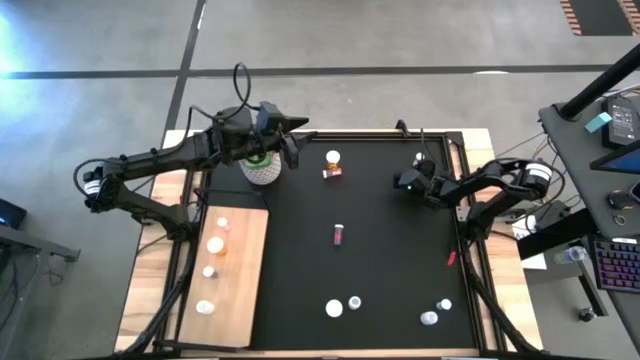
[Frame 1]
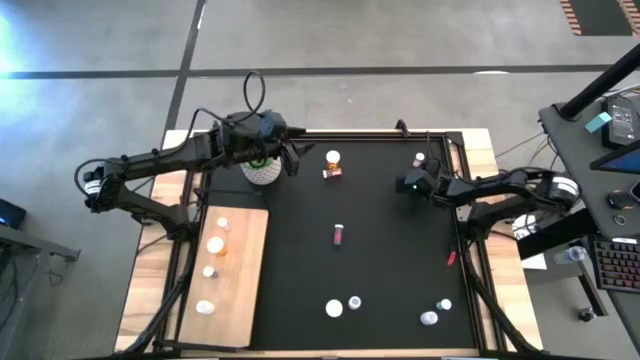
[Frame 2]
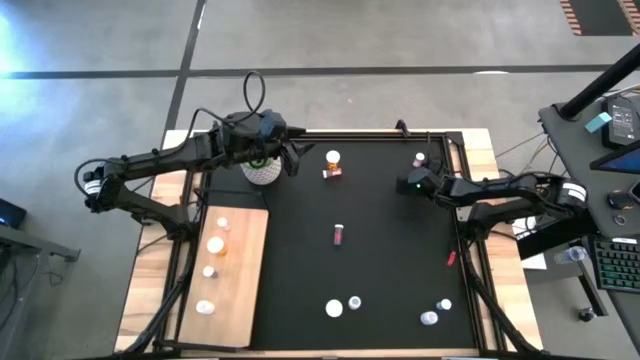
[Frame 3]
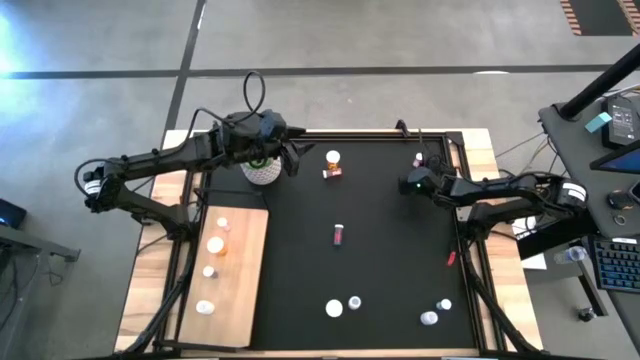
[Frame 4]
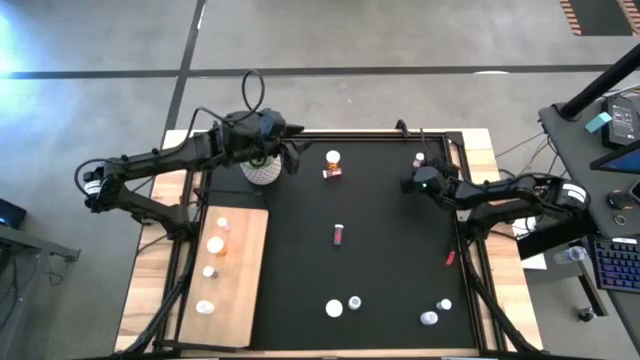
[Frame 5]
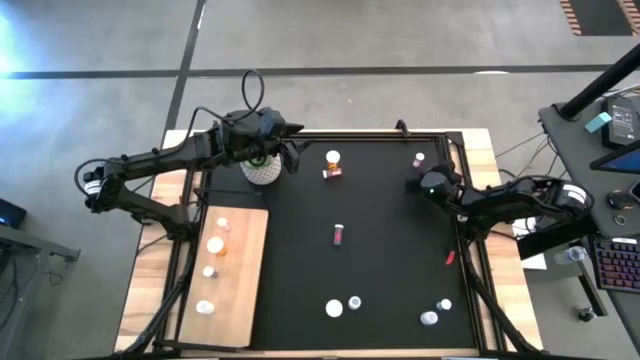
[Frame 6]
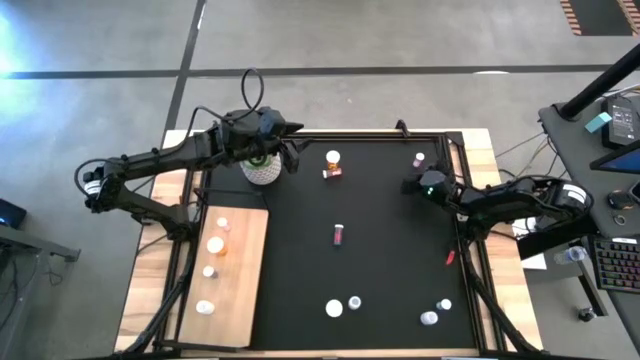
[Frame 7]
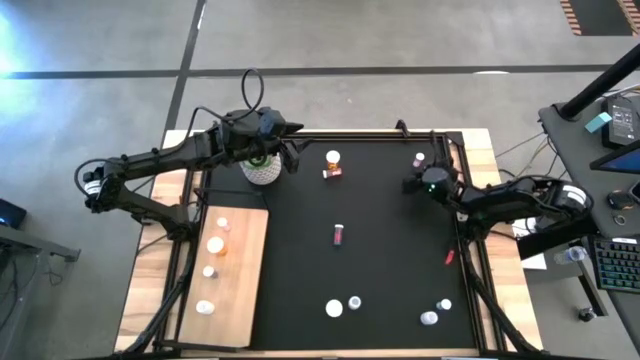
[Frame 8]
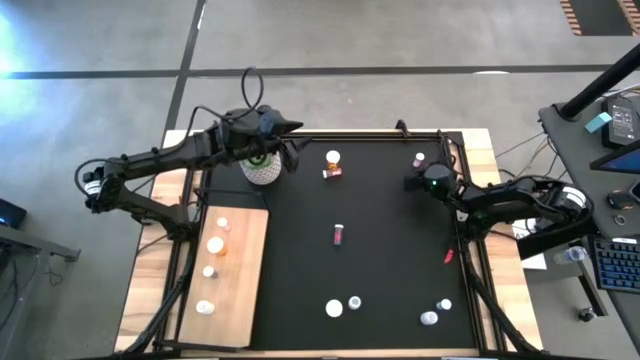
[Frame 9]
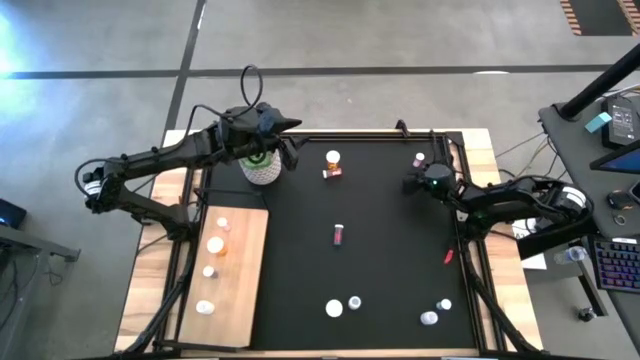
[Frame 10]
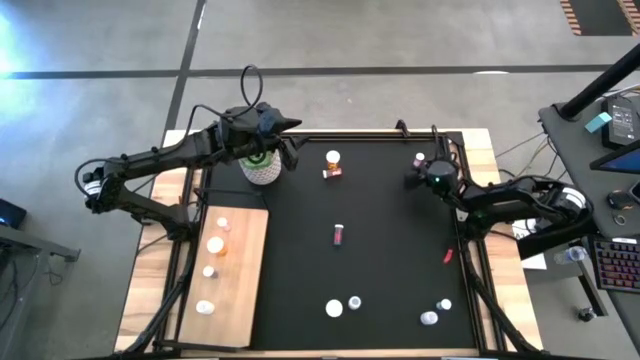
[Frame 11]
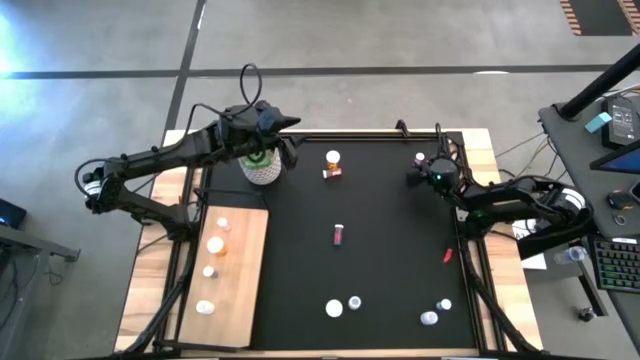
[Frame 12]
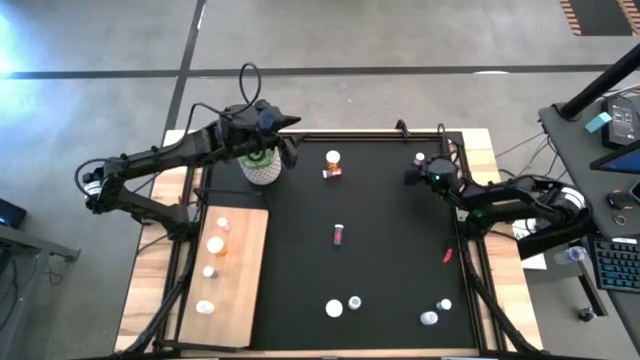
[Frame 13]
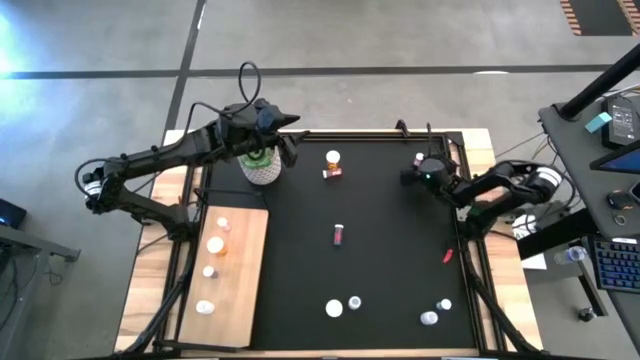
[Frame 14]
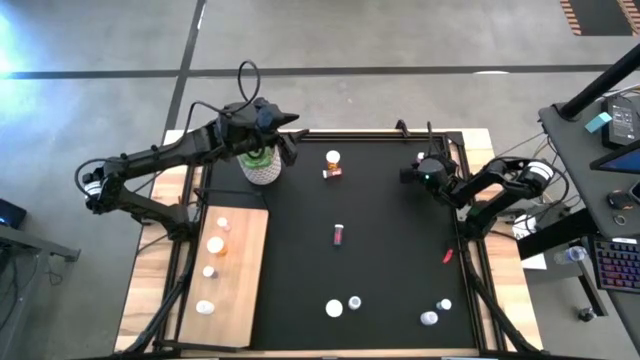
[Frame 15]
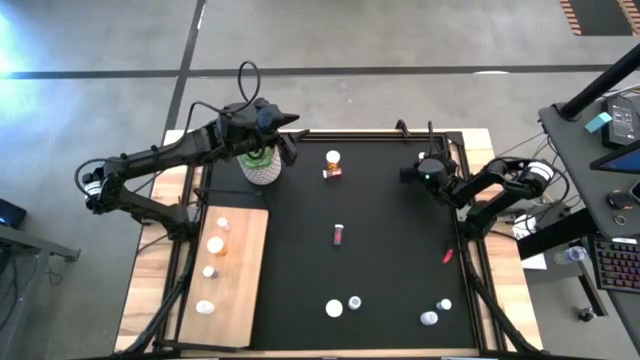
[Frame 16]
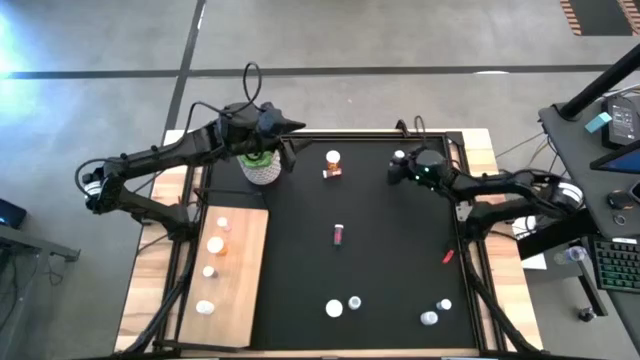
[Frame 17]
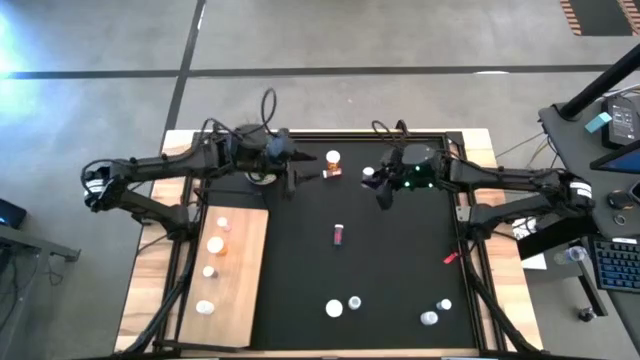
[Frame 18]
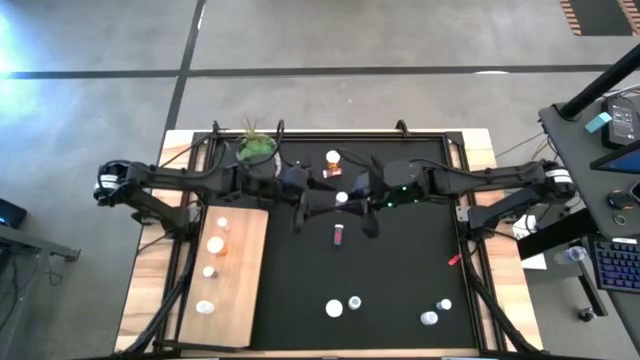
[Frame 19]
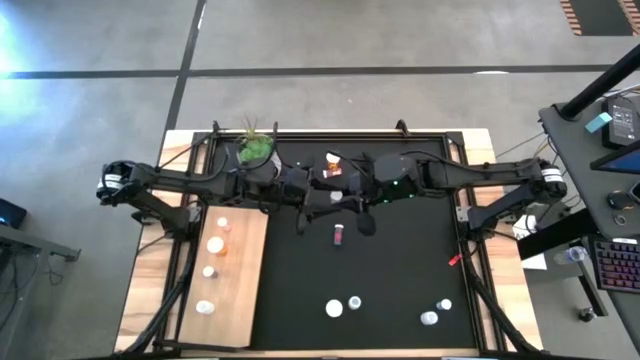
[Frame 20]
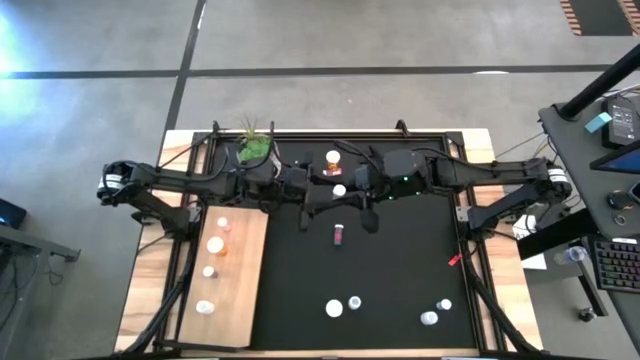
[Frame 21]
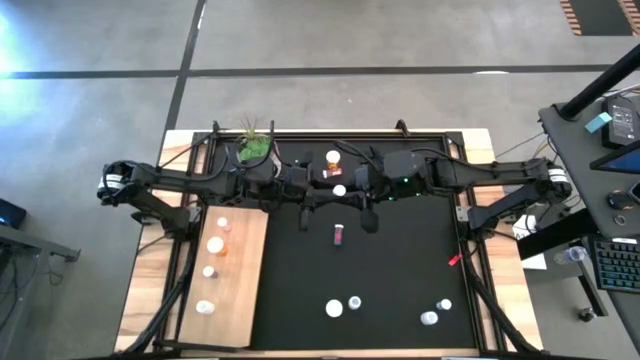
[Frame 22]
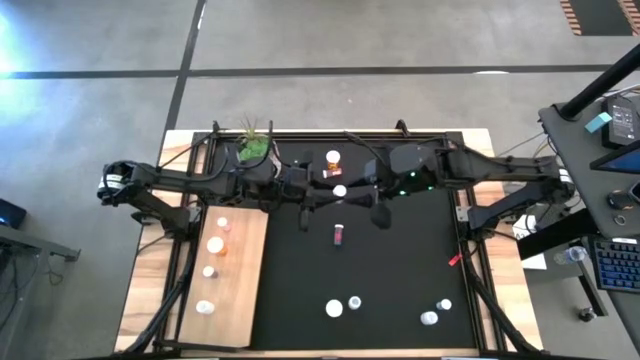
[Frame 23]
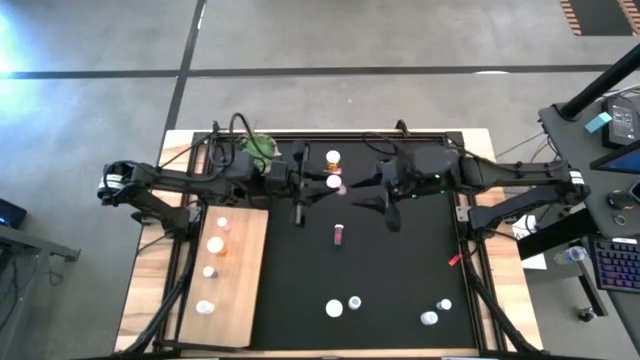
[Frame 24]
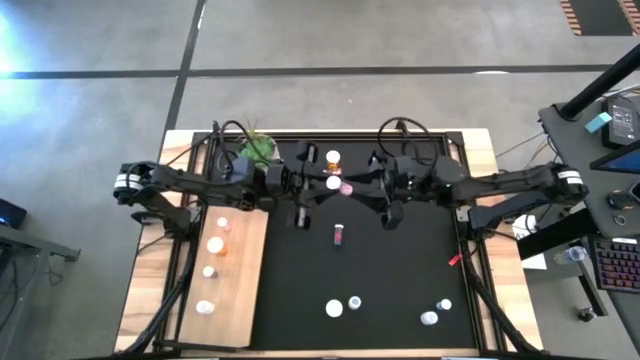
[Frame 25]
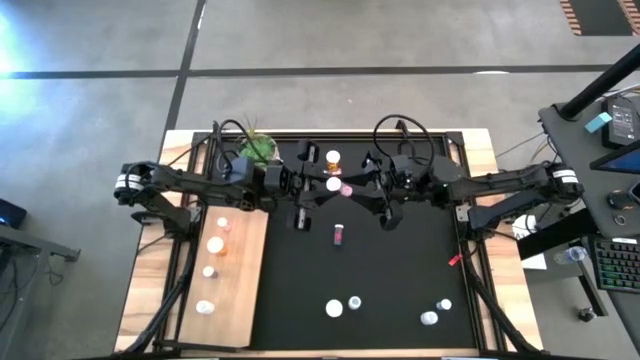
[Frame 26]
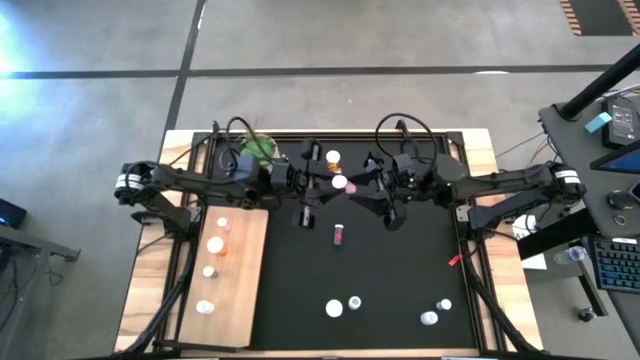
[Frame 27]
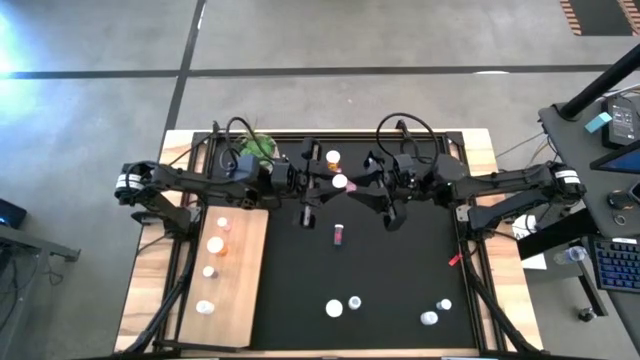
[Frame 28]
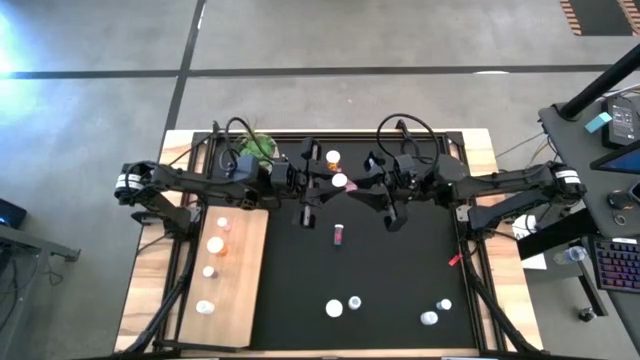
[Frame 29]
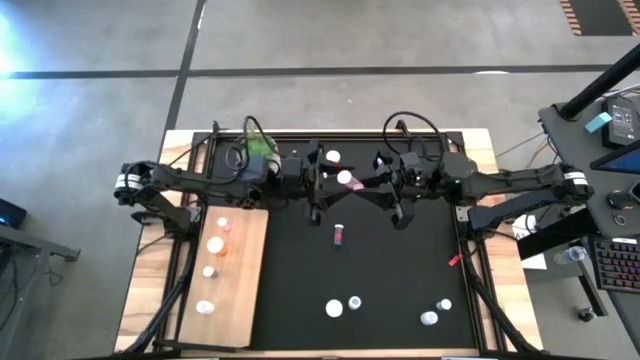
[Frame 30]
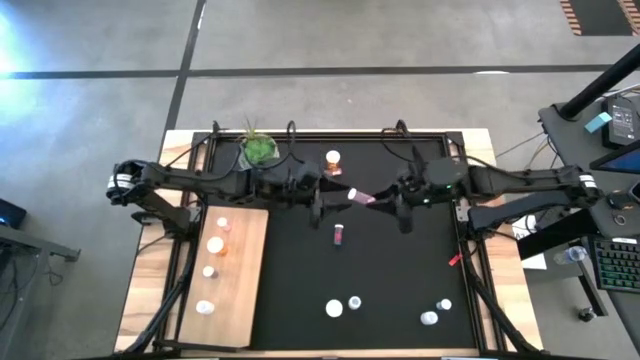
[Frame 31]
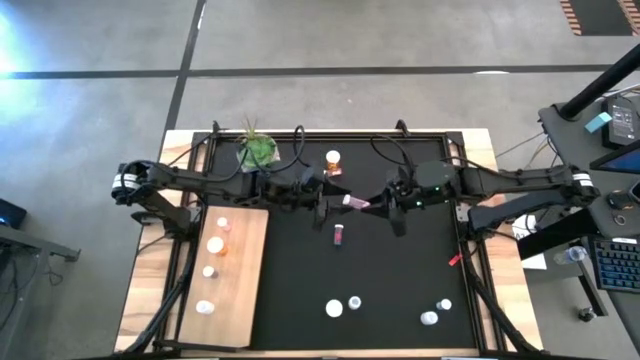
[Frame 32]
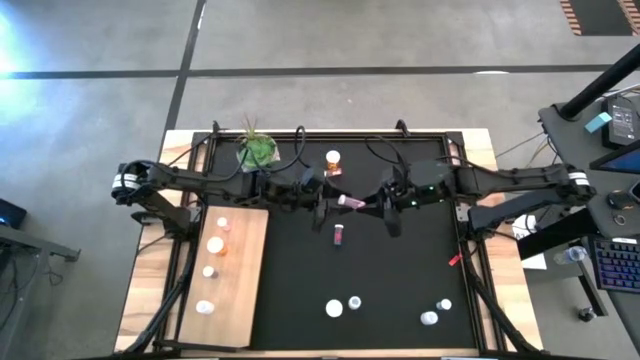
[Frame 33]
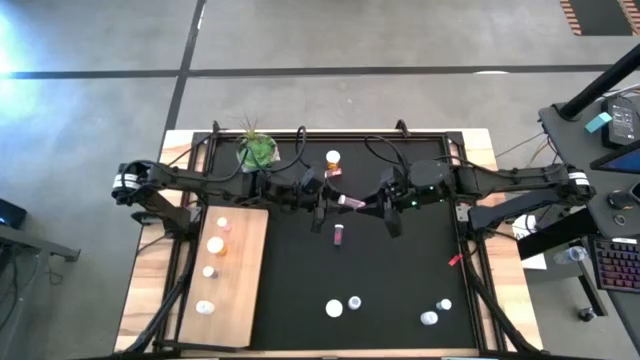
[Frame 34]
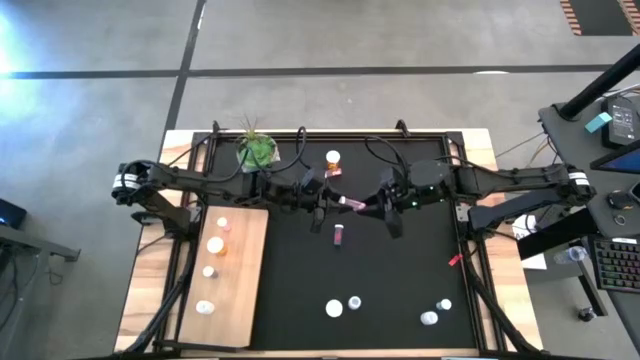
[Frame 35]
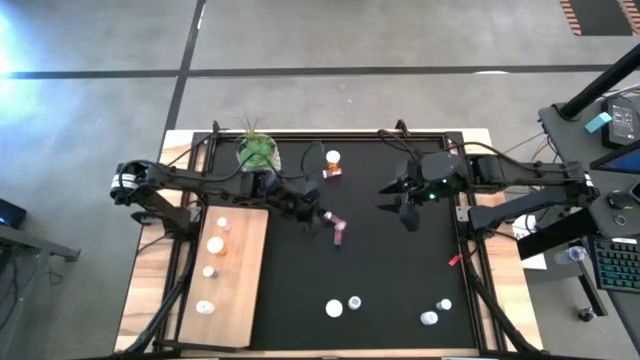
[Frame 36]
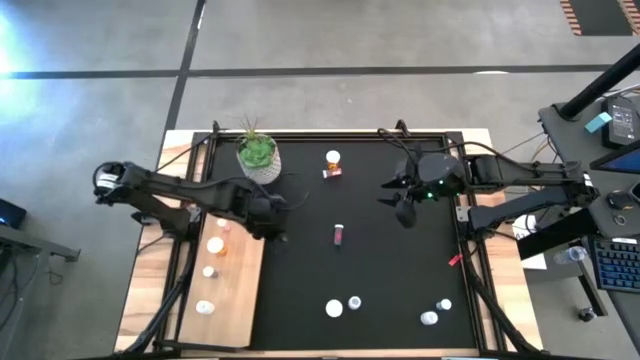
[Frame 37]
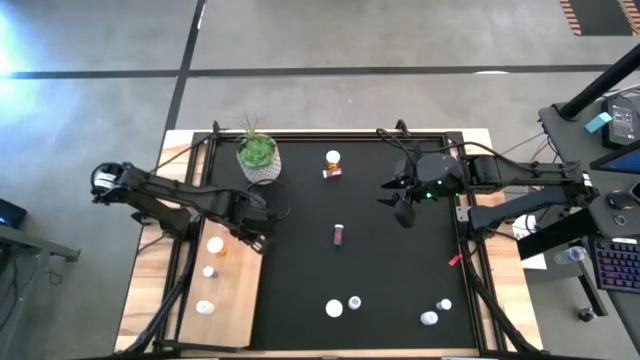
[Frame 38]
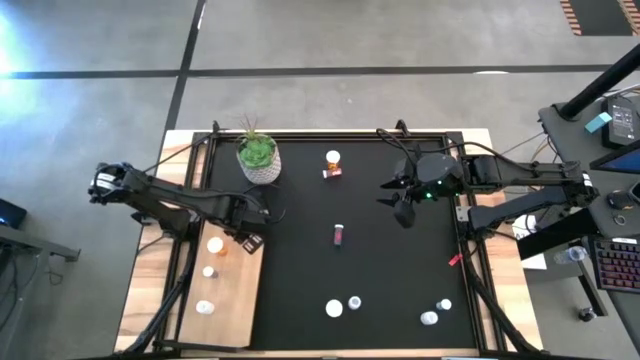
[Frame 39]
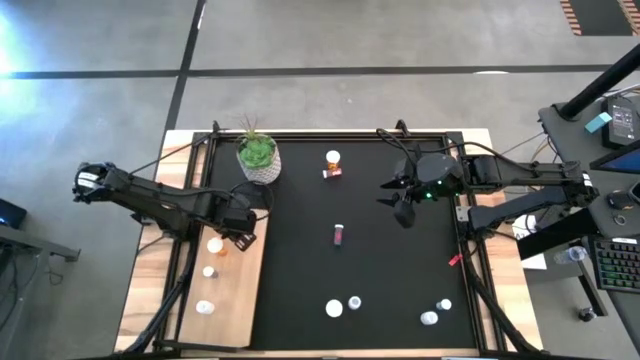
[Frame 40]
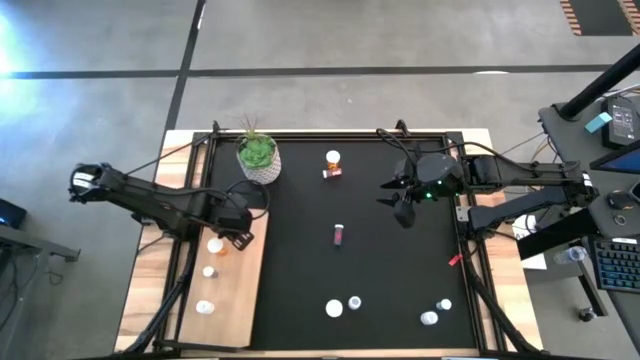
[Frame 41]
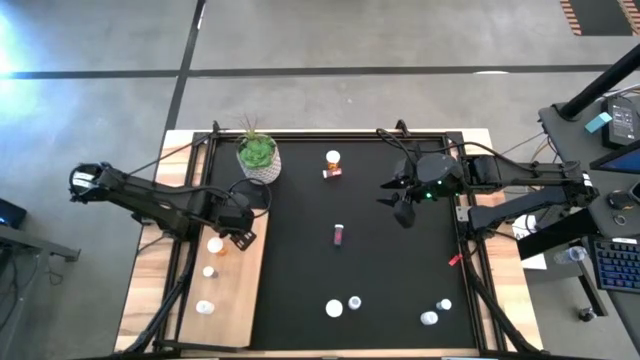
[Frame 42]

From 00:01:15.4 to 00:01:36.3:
Task: Pick and place medicine bottles onto shelf by color
Put the right pink pill bottle on the shelf aligned with the other pink pill bottle
